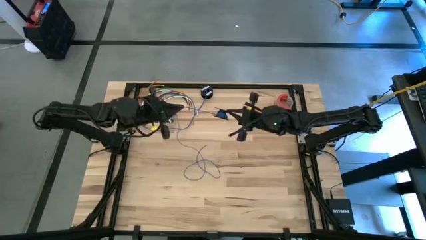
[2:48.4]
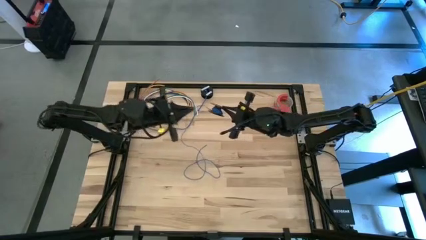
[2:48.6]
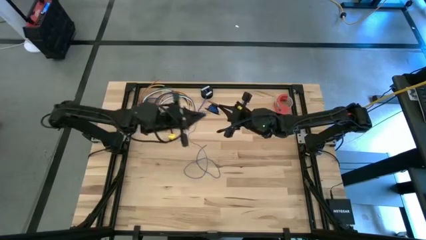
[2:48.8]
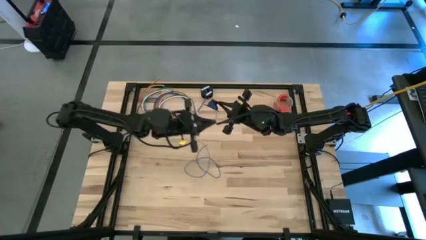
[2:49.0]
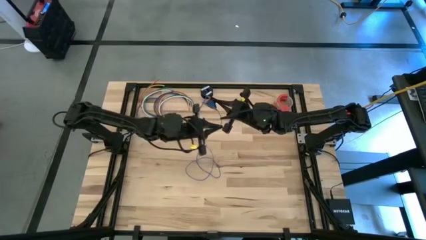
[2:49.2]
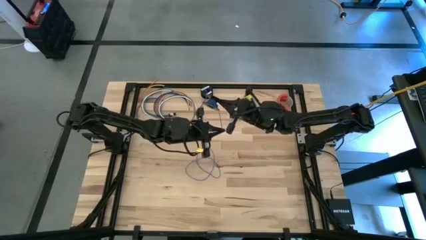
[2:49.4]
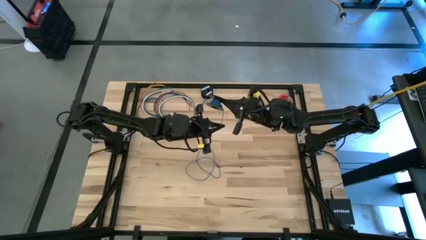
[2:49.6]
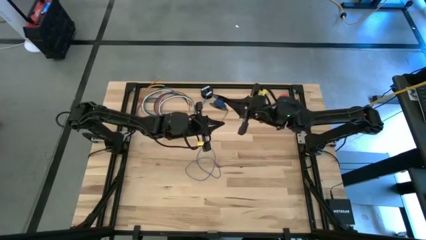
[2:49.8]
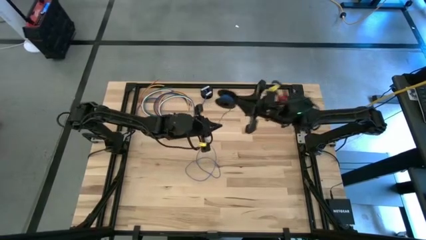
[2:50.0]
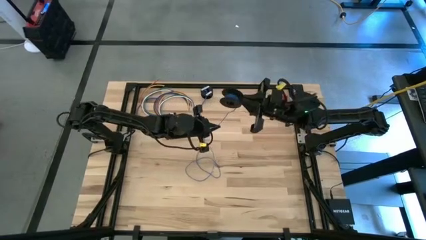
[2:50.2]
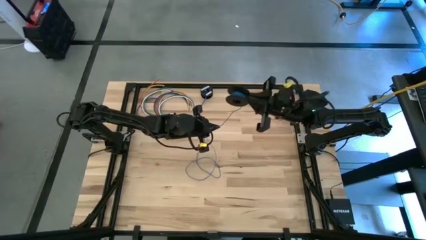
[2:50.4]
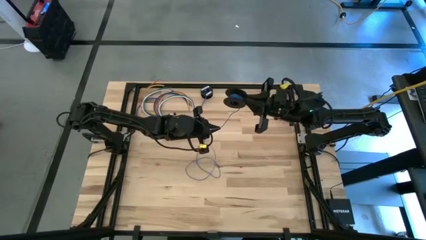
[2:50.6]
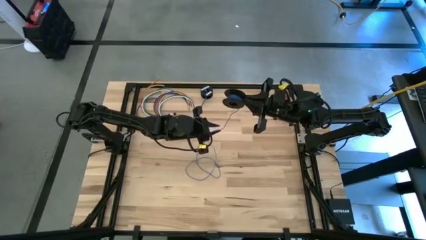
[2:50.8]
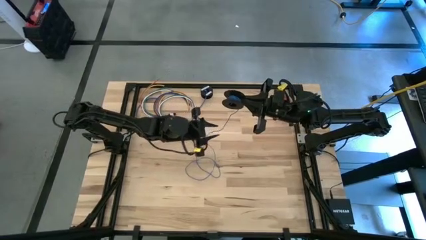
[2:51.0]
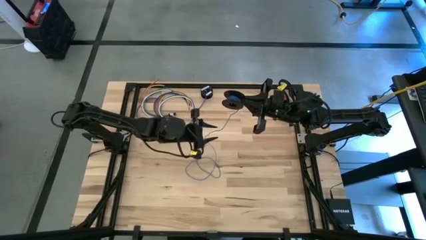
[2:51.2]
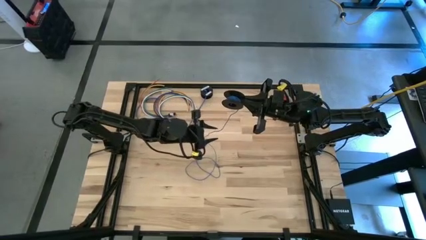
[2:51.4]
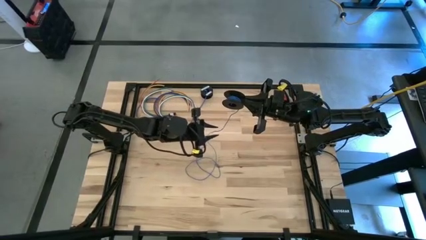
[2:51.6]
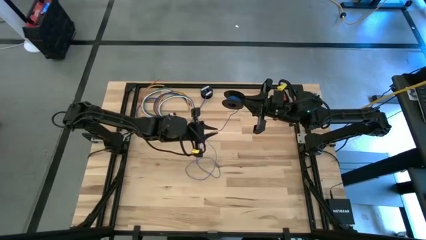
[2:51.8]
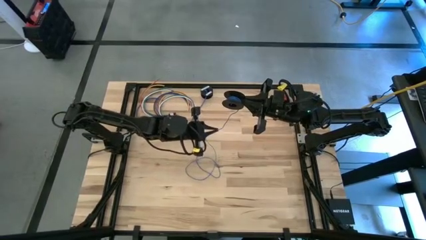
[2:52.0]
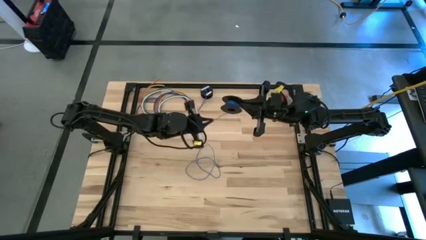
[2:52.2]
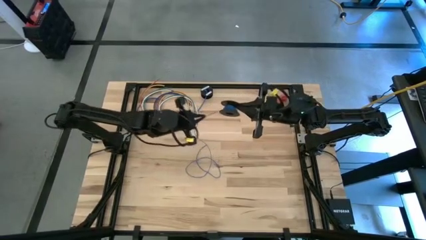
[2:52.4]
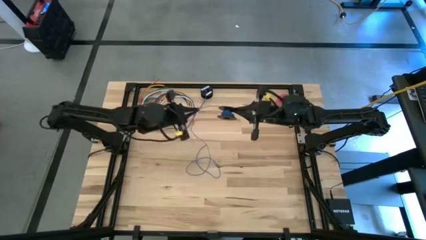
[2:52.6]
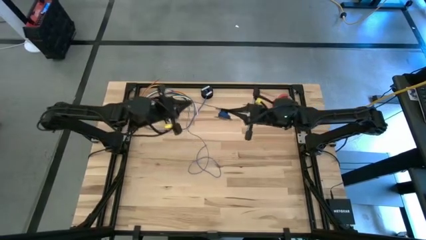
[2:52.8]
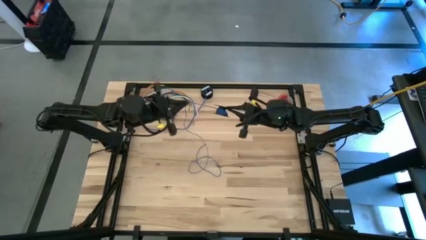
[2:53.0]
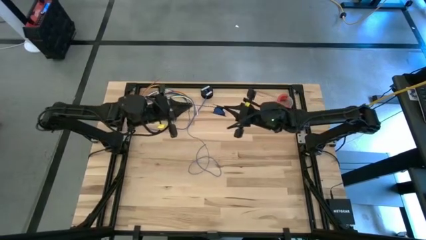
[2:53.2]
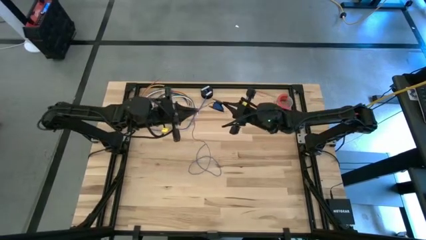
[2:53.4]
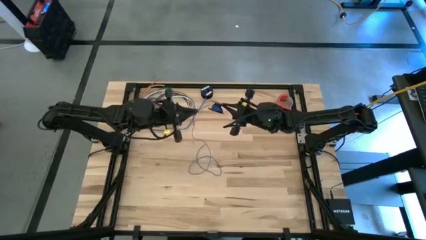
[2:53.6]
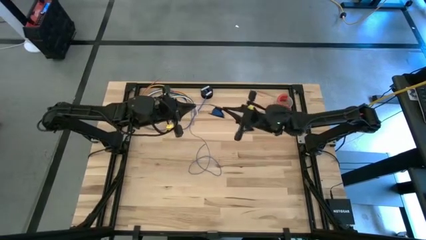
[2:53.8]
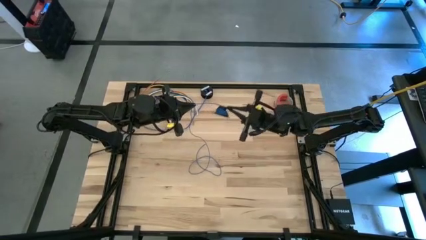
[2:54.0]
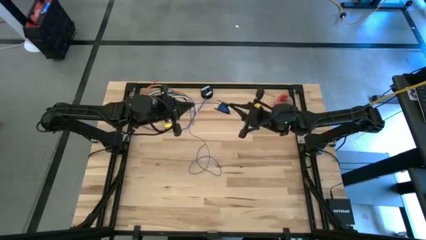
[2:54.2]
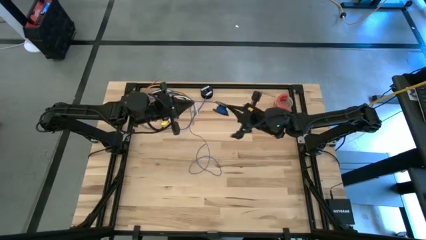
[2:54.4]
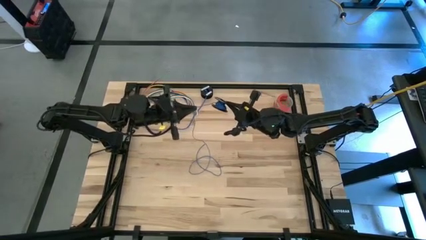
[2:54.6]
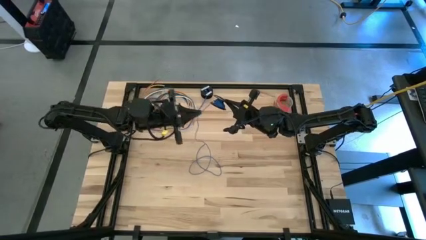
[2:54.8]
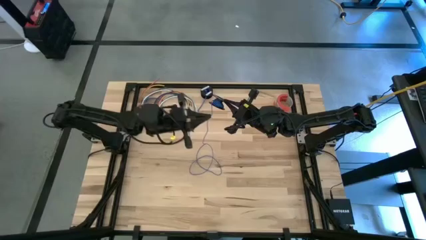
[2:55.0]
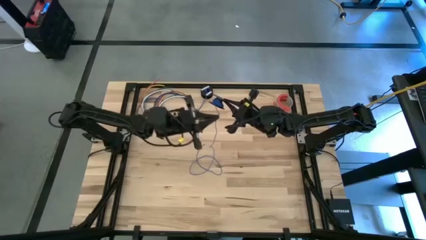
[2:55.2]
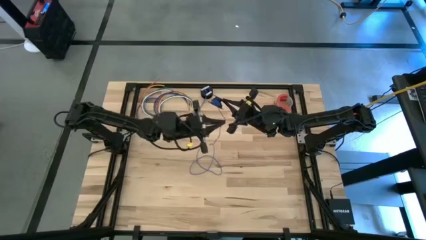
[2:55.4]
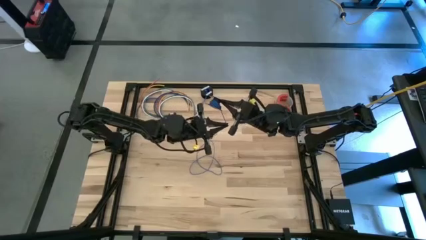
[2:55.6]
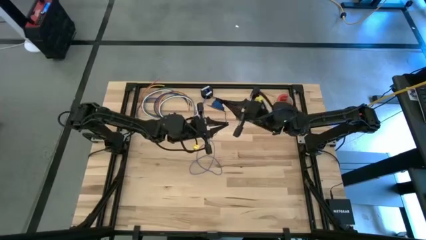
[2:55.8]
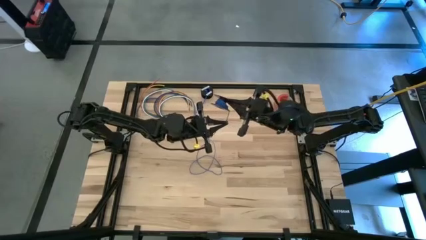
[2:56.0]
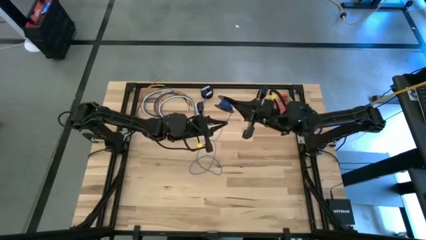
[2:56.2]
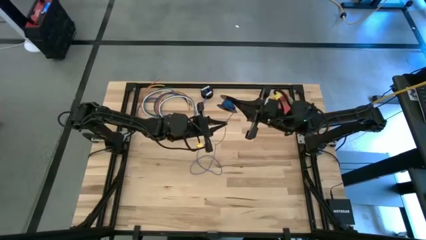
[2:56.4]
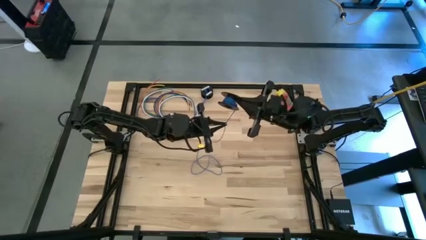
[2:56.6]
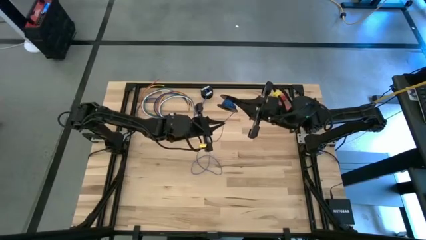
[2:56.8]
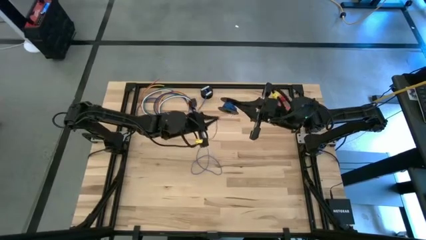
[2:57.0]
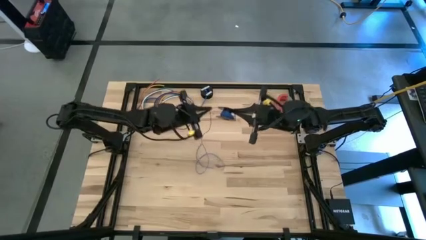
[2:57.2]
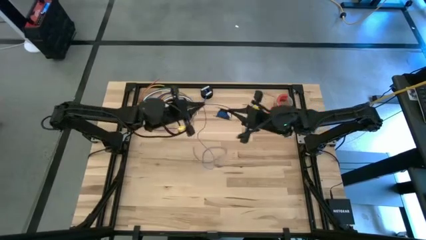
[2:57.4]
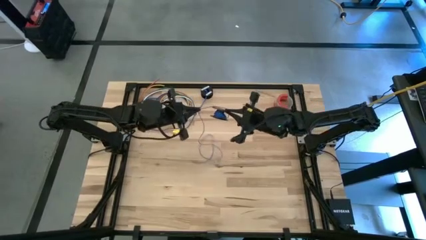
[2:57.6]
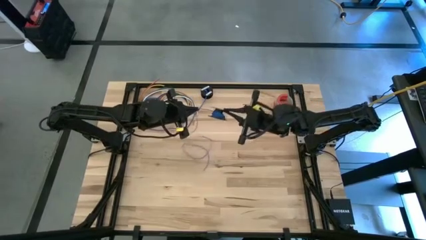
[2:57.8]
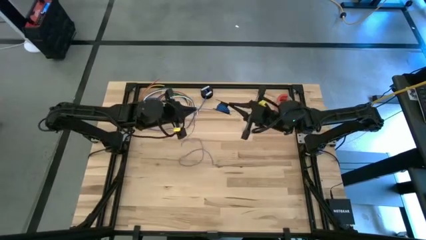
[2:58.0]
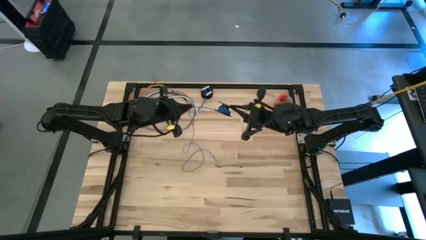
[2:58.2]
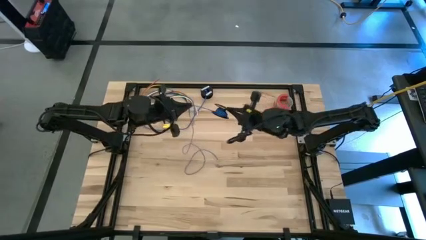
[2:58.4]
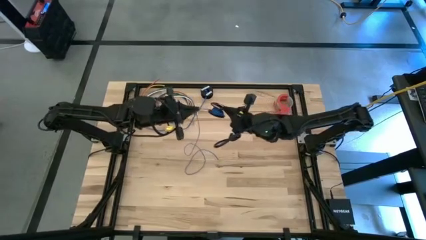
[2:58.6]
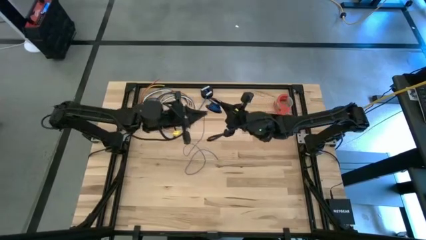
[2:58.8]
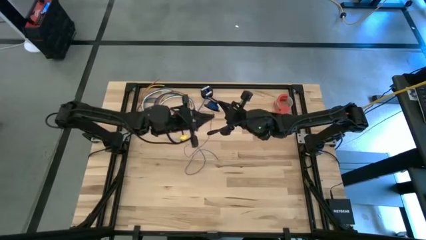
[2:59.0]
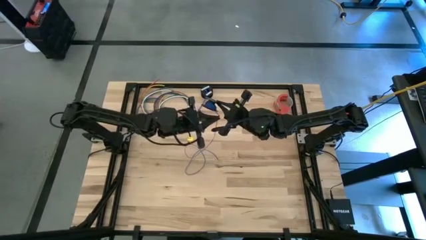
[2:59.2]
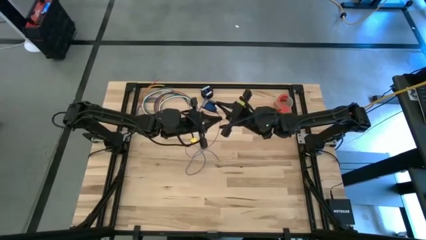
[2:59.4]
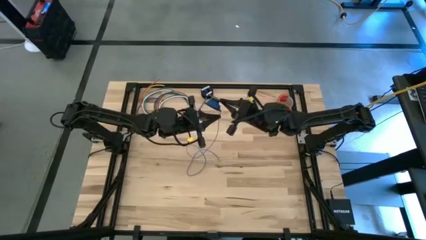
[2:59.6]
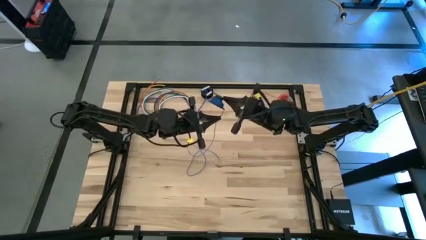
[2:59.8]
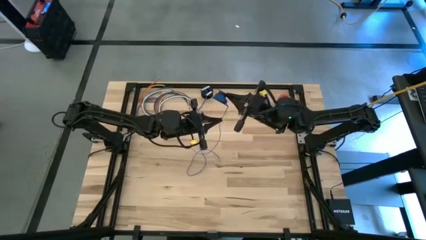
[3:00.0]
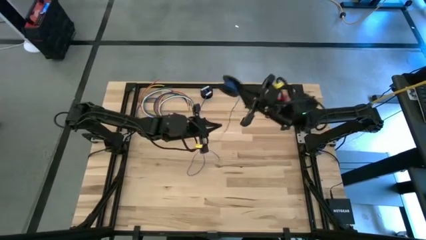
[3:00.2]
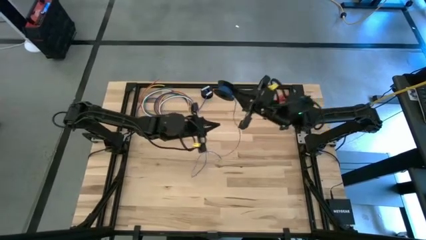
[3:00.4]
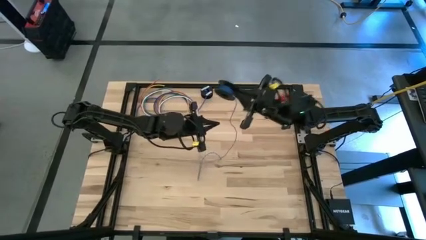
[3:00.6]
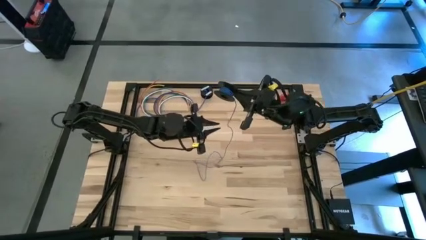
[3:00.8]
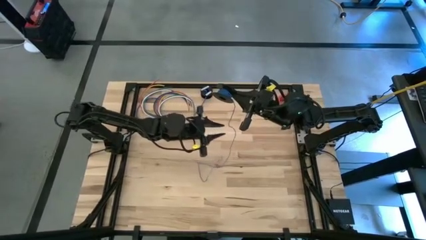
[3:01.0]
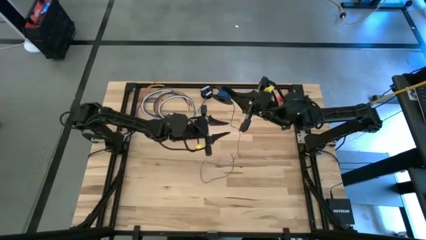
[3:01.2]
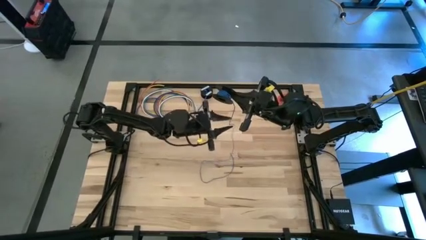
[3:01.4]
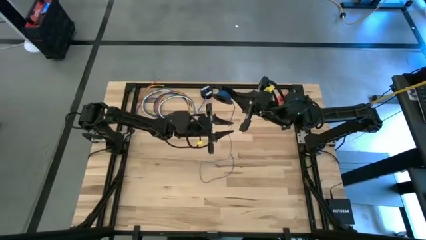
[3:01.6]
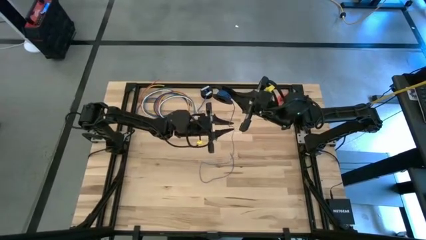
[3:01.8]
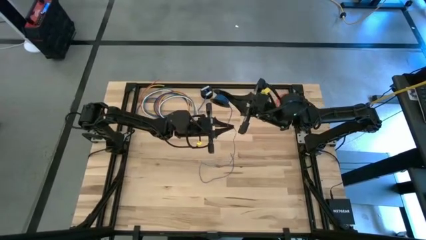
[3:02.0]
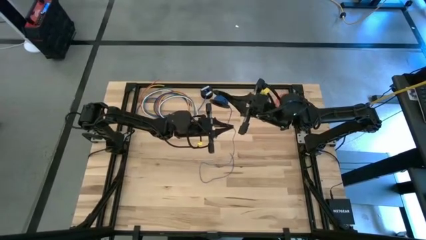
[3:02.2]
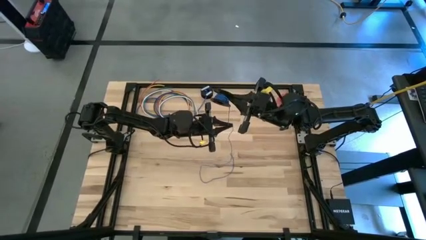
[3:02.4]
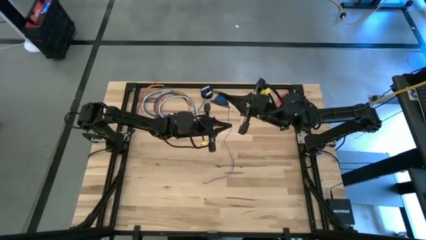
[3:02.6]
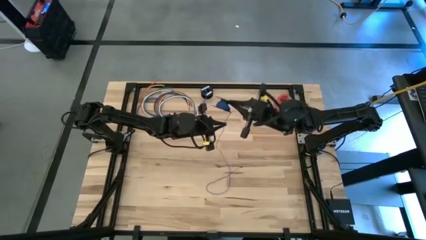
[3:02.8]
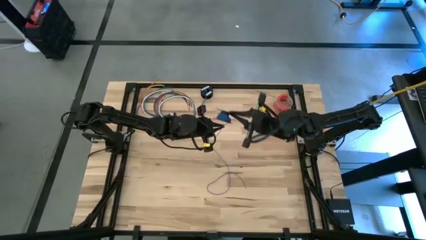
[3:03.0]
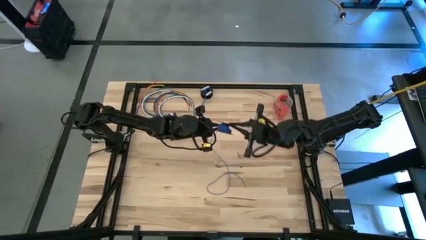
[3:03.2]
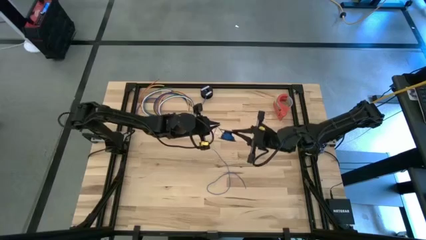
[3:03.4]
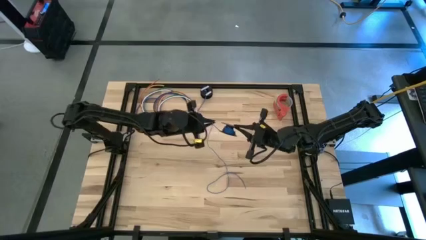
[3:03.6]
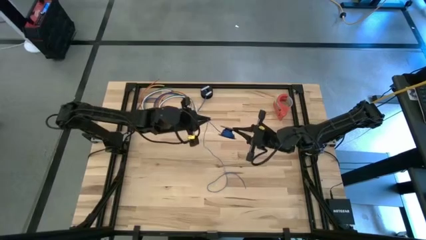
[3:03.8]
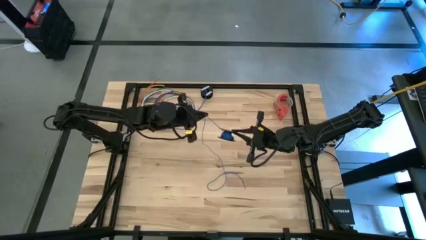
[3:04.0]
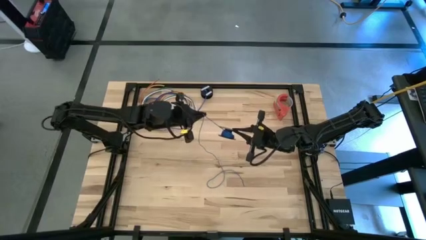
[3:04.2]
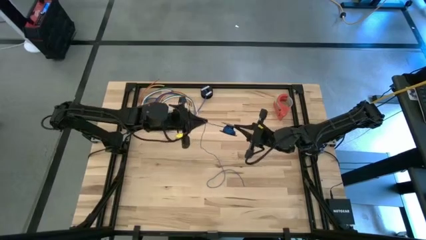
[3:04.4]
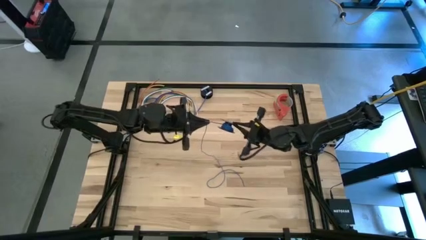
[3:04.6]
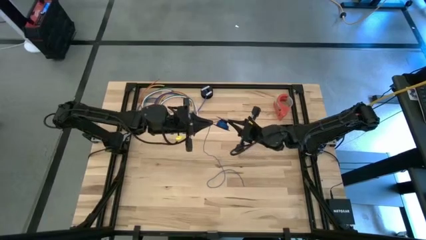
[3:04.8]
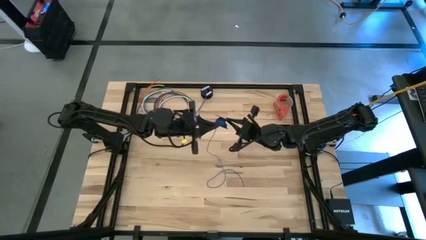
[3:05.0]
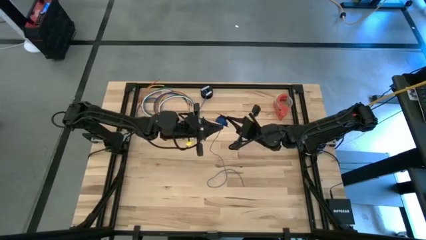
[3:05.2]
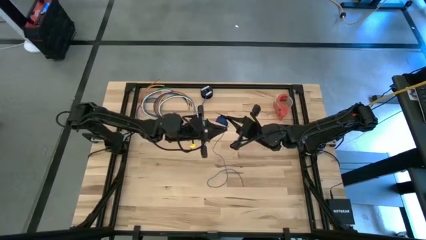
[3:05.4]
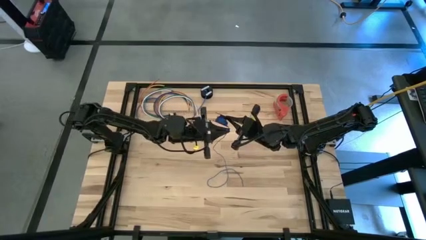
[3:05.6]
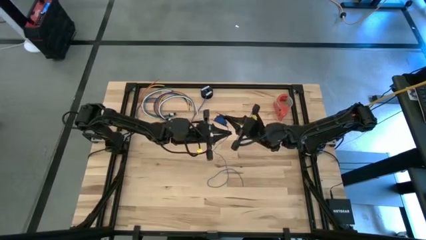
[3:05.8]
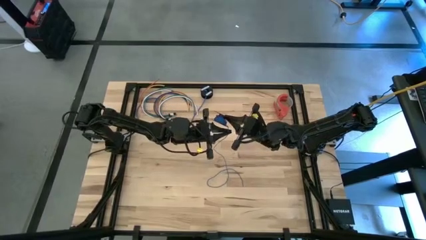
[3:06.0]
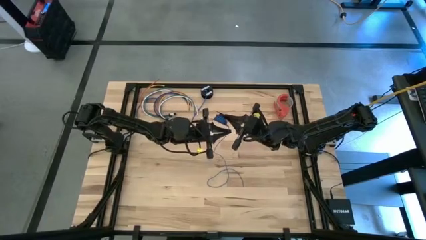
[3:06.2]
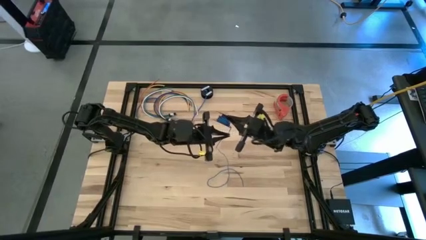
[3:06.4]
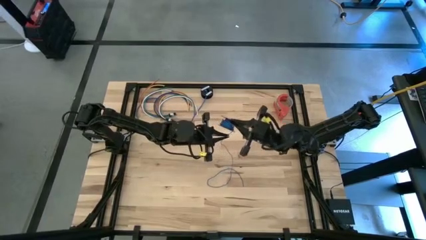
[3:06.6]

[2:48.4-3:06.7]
Task: Coil cords
Coil the blue wire onto the black spool
